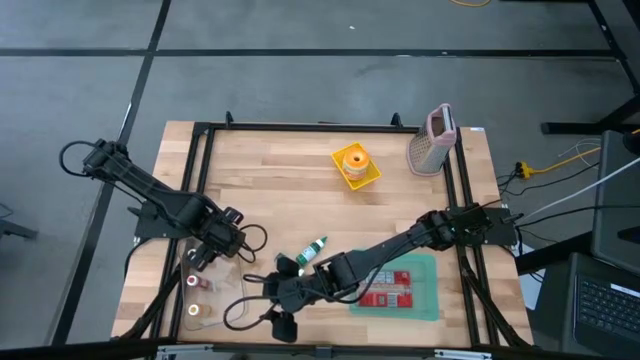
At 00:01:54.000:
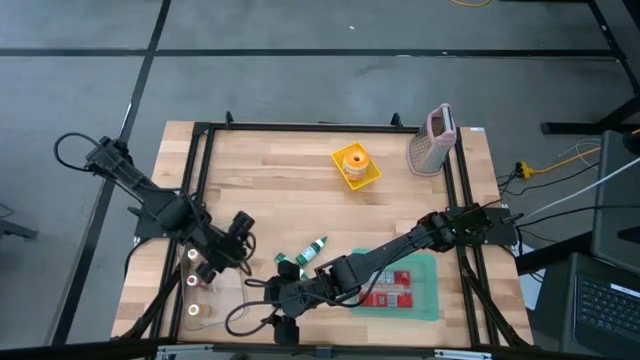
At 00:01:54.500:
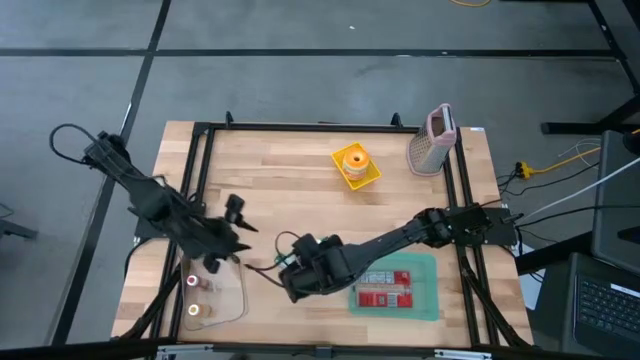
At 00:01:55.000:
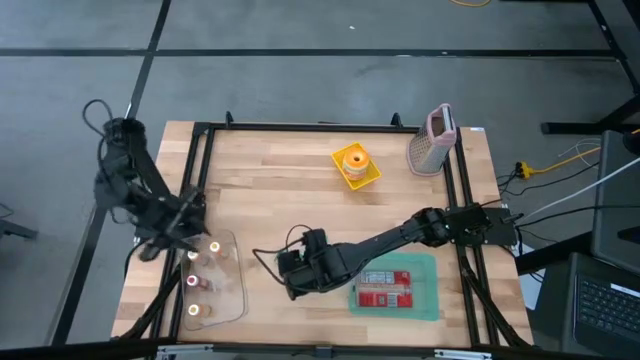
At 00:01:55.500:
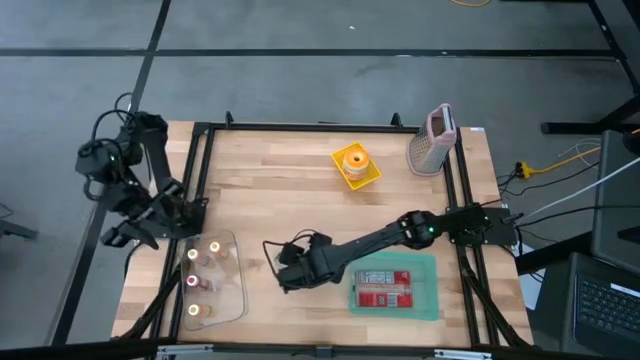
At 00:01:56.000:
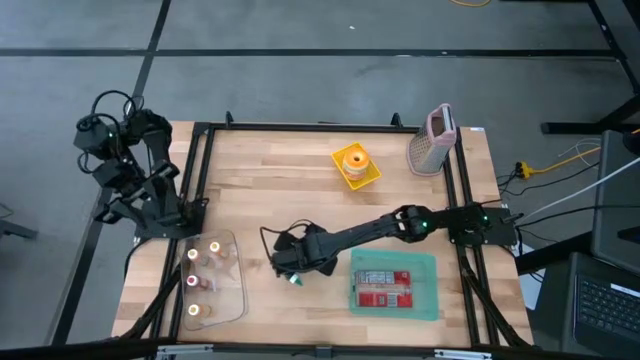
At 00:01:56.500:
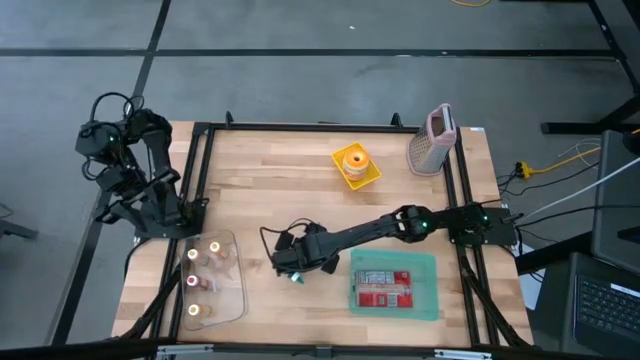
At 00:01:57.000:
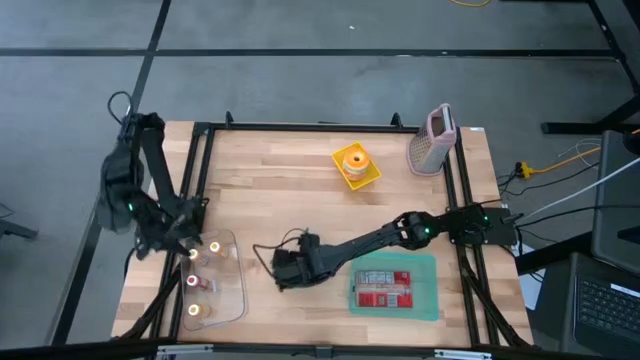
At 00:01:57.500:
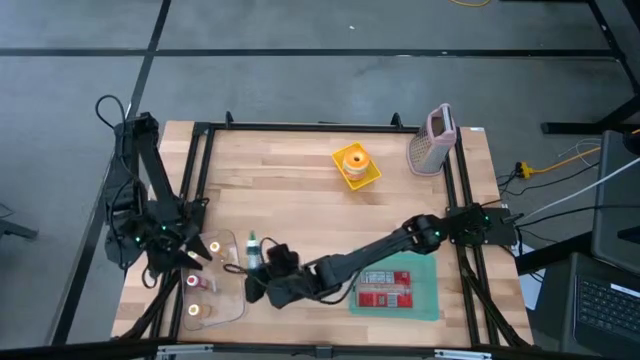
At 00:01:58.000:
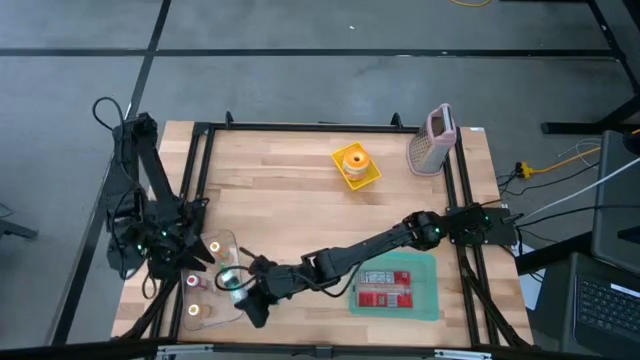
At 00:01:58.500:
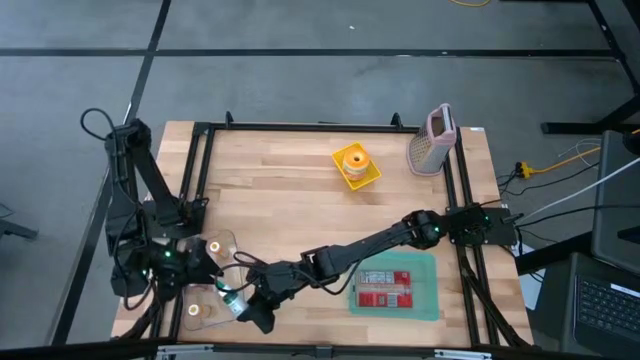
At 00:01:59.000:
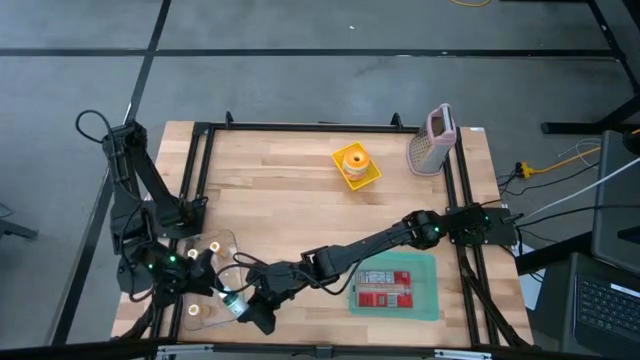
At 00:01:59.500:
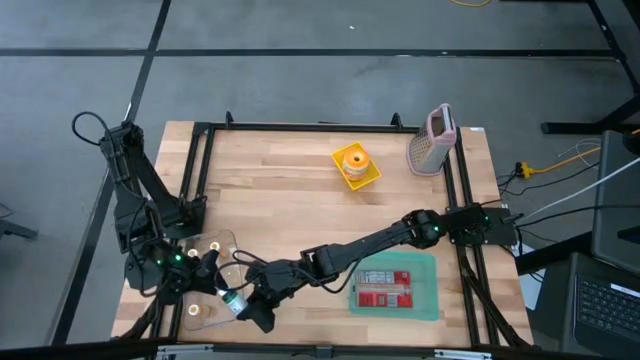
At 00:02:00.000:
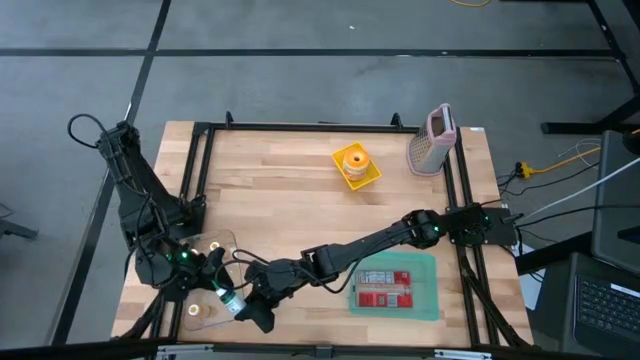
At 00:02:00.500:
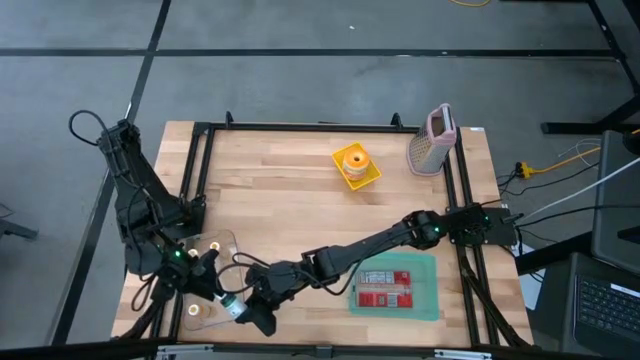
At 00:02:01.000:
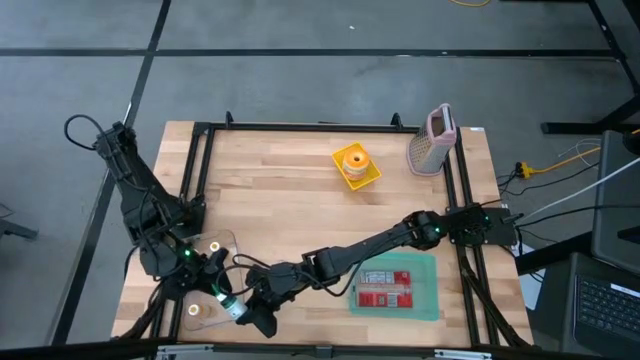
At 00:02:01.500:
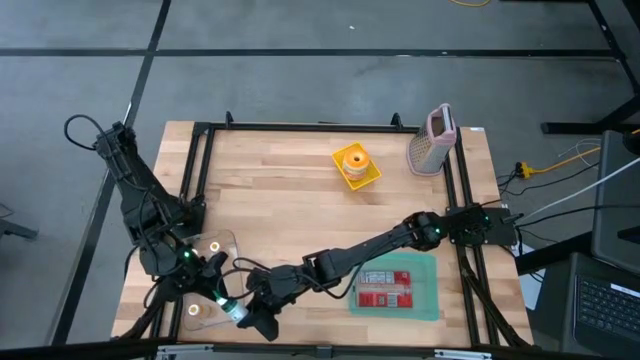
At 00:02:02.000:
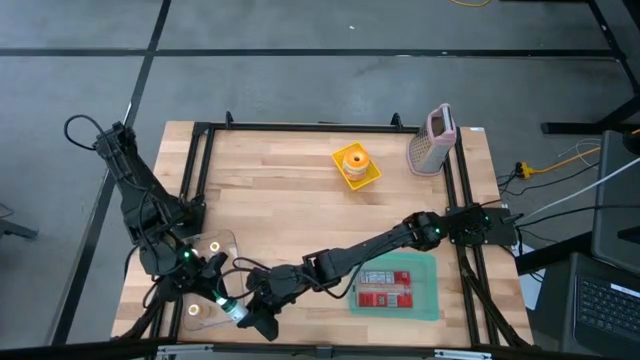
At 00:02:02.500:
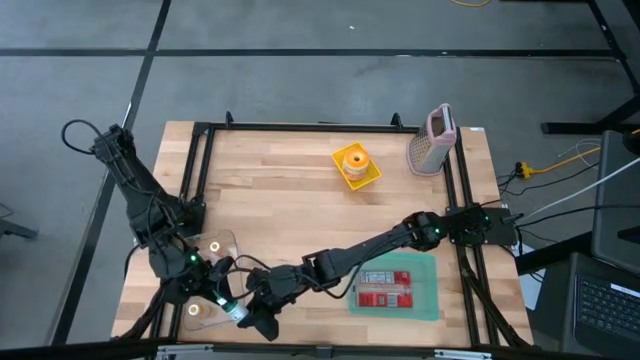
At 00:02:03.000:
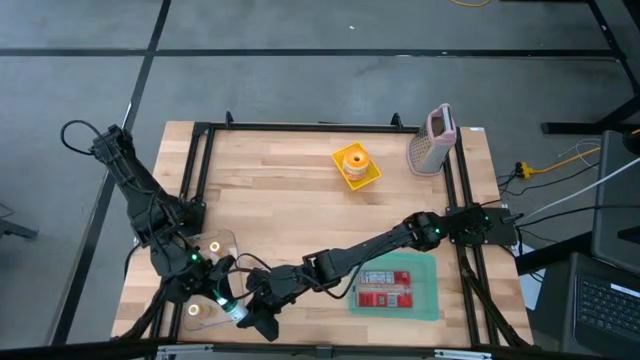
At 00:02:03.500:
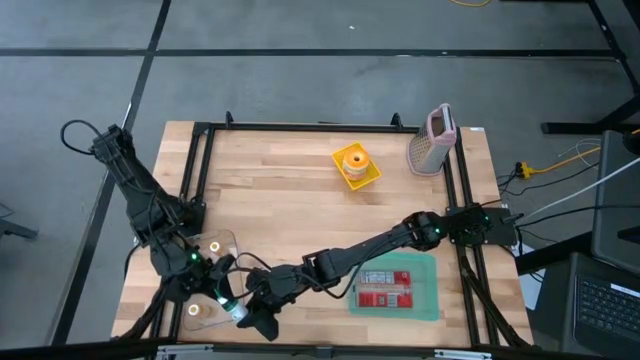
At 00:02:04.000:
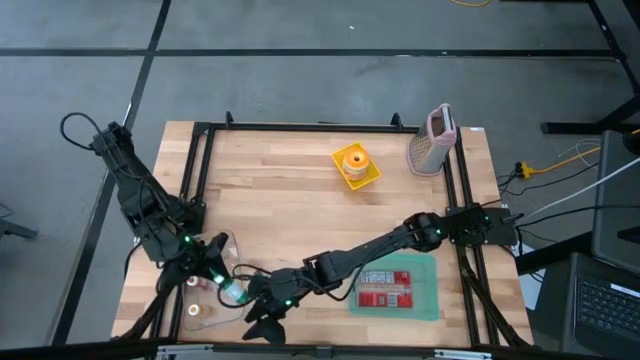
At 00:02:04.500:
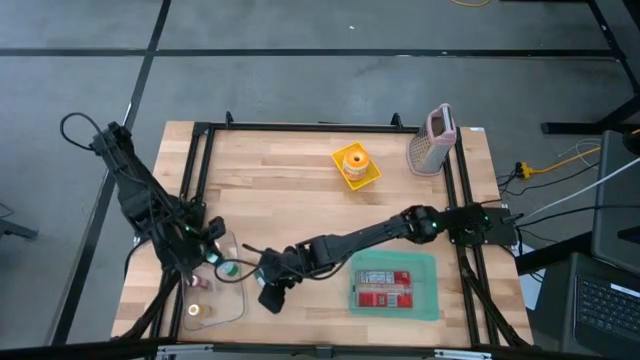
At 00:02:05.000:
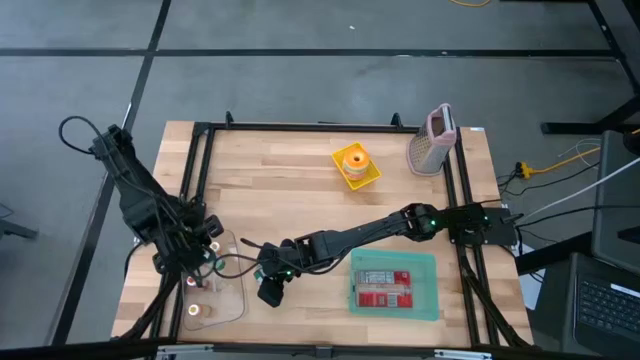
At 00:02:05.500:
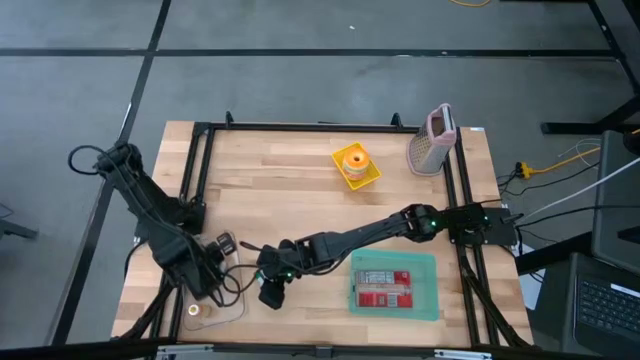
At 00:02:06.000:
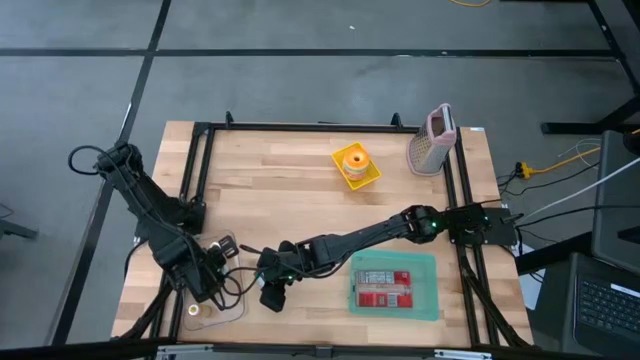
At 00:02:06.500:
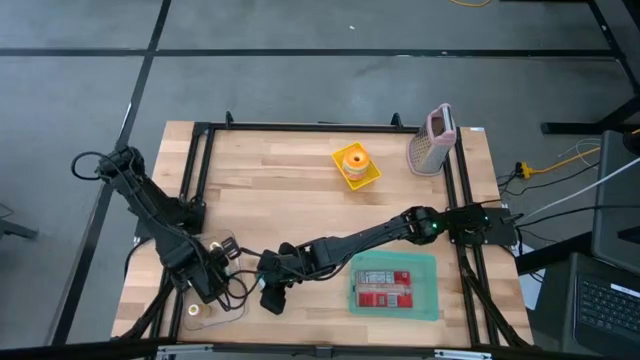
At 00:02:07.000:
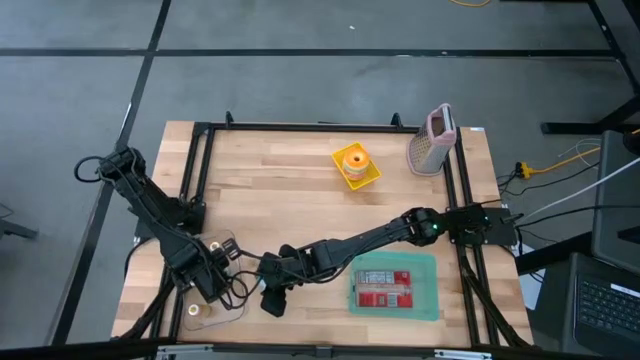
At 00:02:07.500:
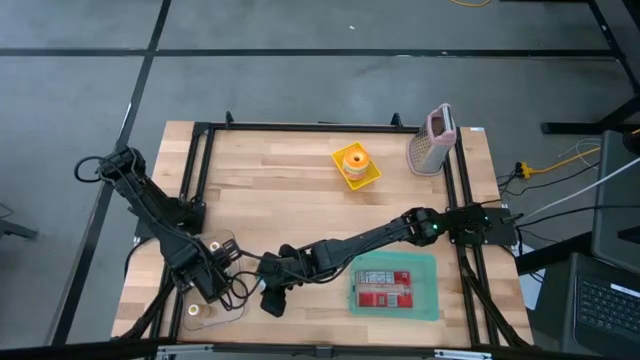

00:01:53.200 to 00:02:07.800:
Put the top green food coloring bottle into the transparent bin
